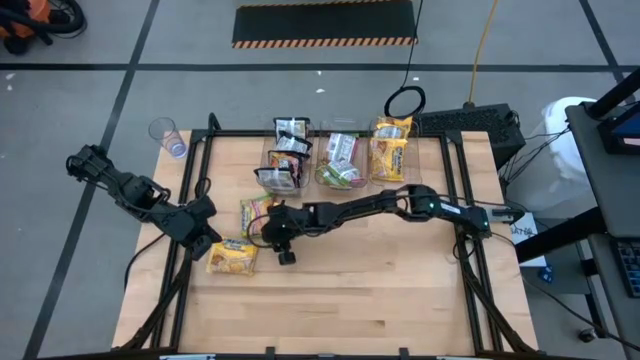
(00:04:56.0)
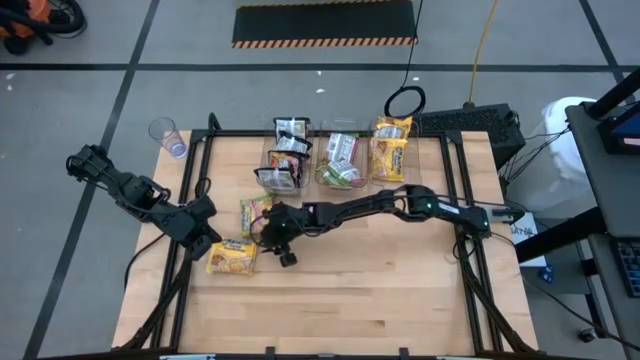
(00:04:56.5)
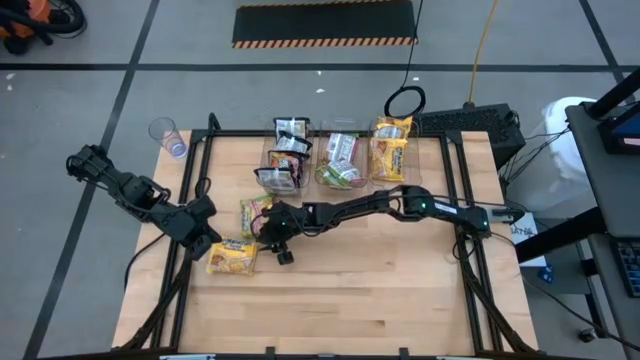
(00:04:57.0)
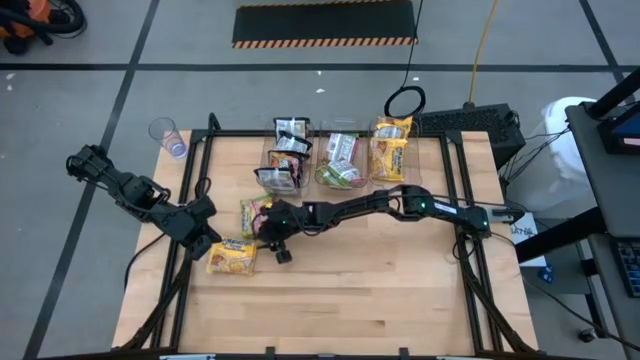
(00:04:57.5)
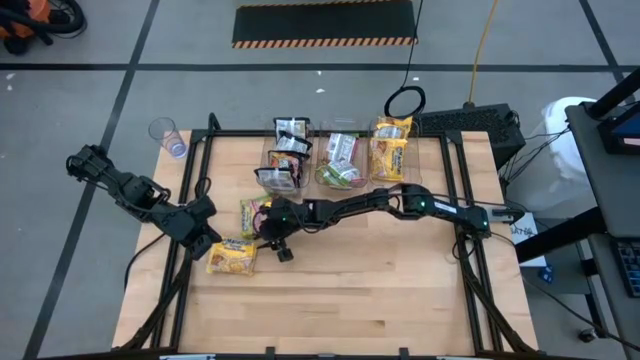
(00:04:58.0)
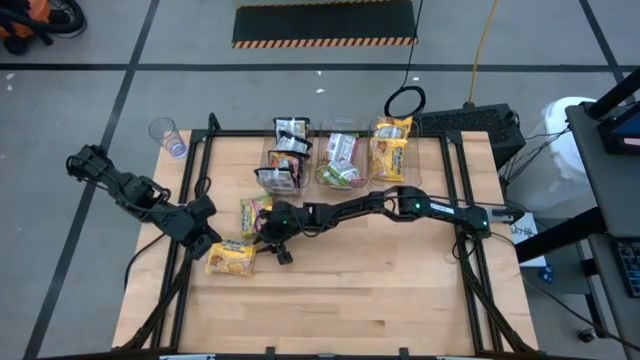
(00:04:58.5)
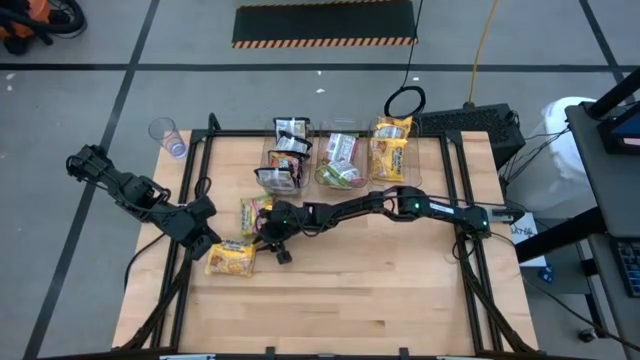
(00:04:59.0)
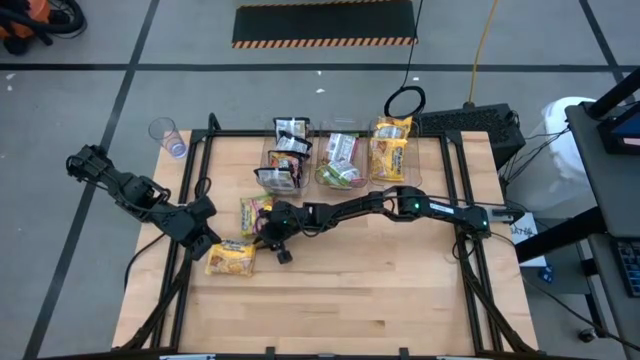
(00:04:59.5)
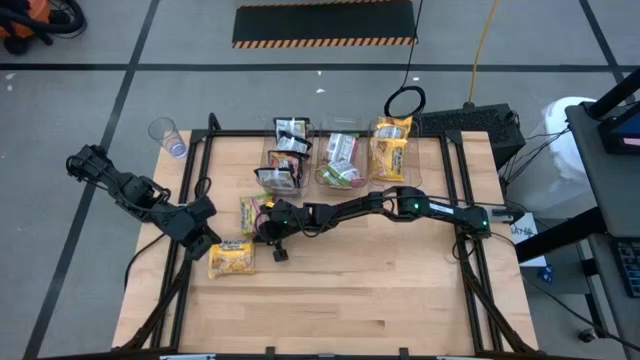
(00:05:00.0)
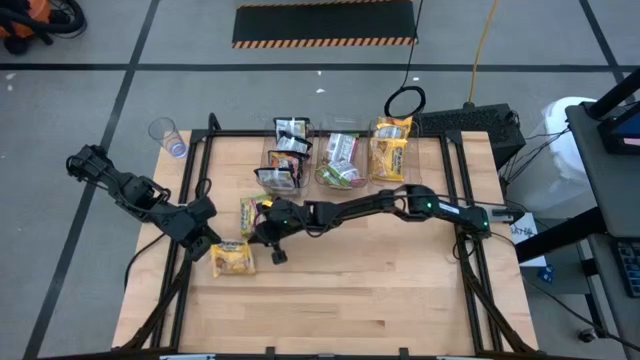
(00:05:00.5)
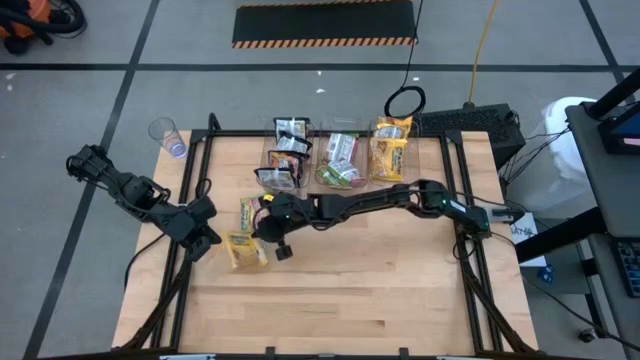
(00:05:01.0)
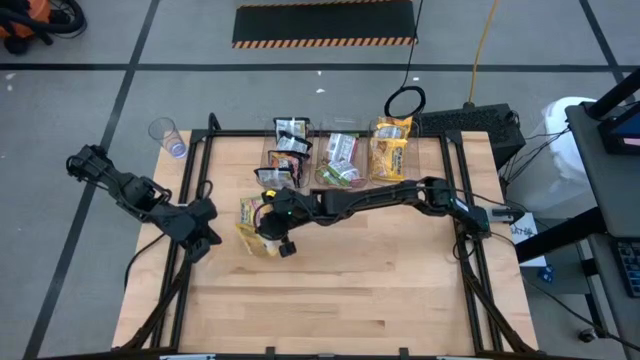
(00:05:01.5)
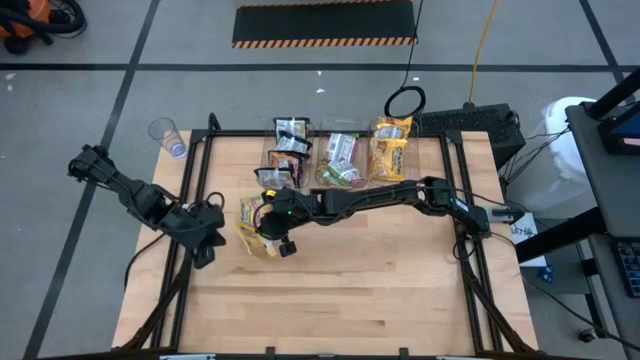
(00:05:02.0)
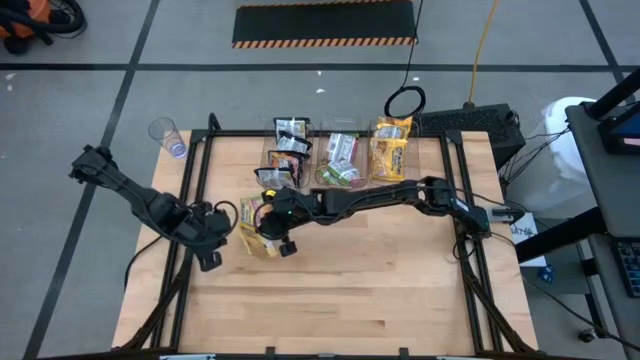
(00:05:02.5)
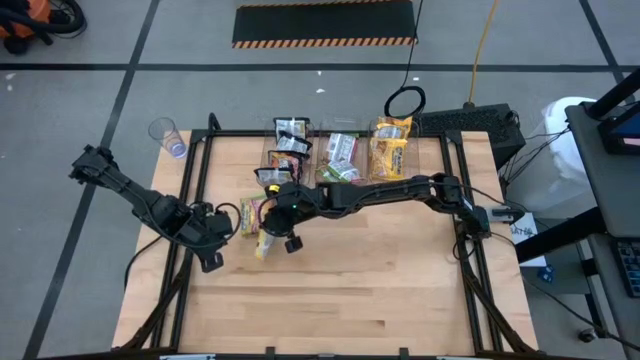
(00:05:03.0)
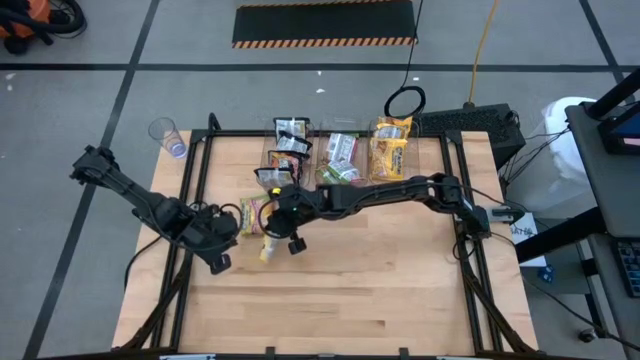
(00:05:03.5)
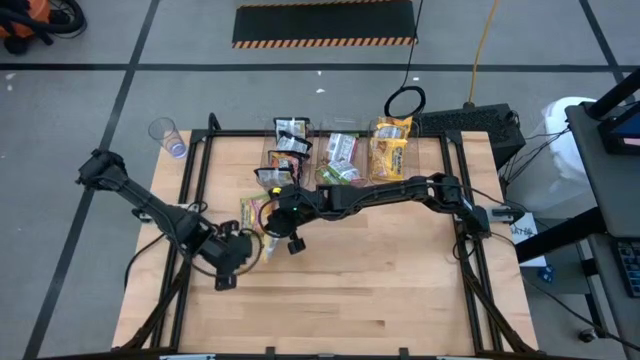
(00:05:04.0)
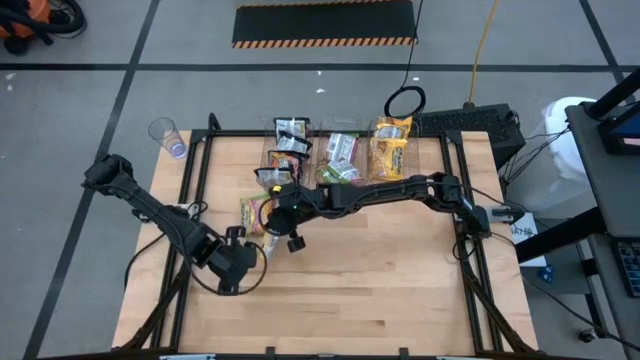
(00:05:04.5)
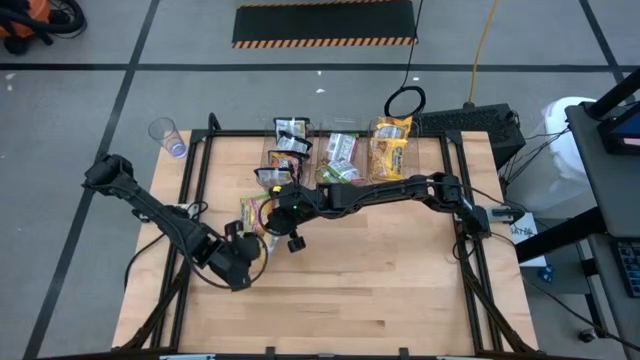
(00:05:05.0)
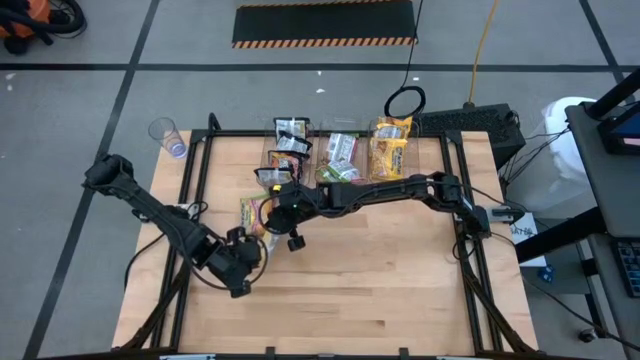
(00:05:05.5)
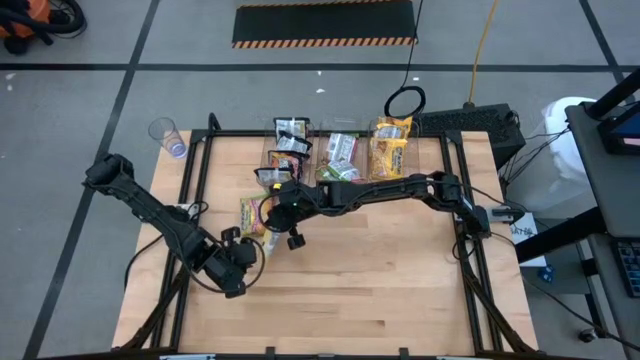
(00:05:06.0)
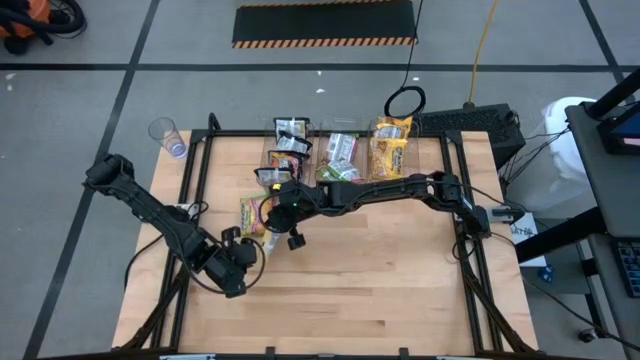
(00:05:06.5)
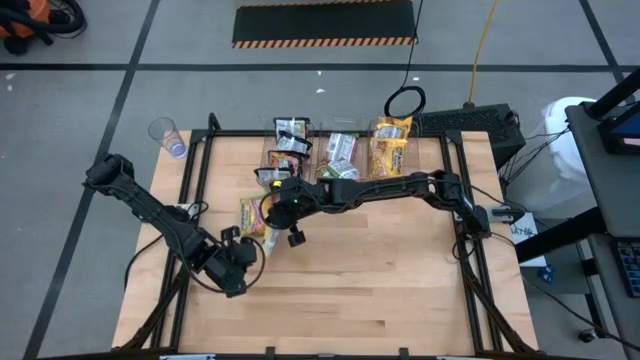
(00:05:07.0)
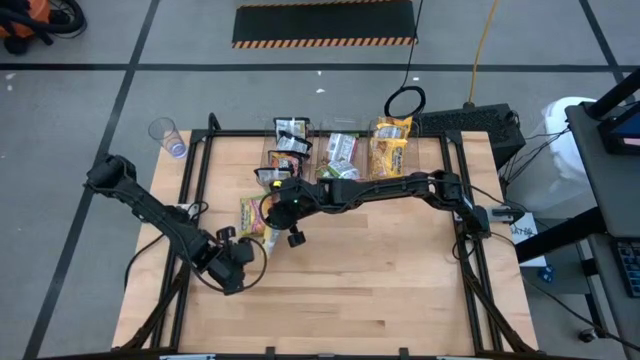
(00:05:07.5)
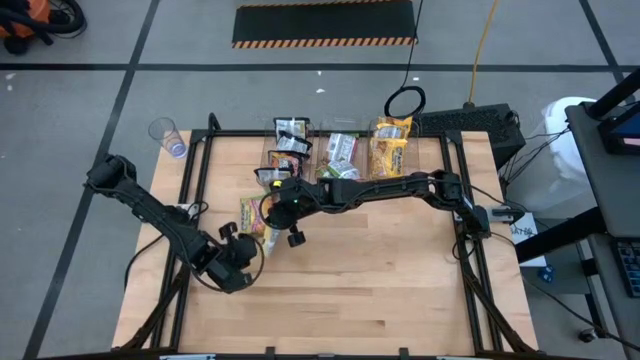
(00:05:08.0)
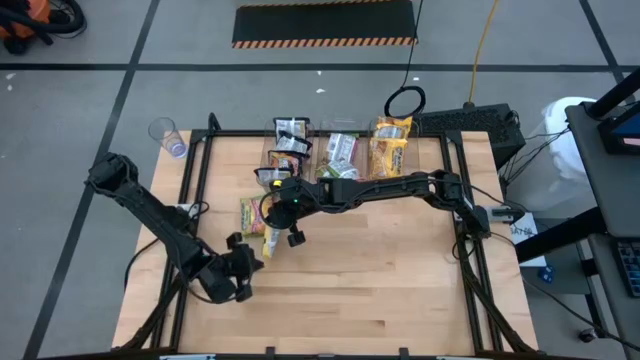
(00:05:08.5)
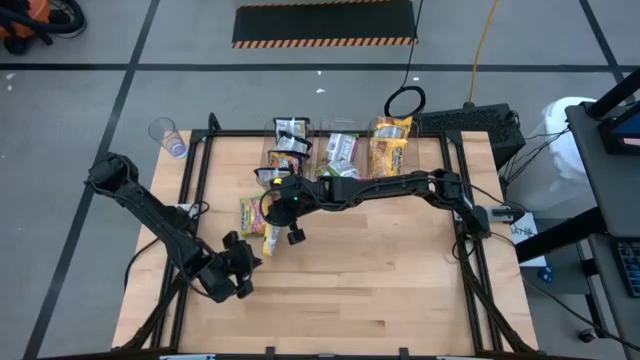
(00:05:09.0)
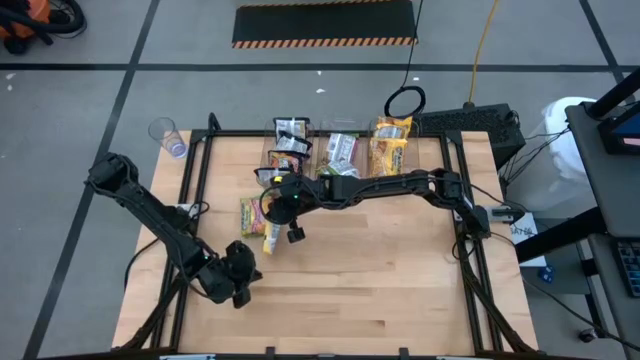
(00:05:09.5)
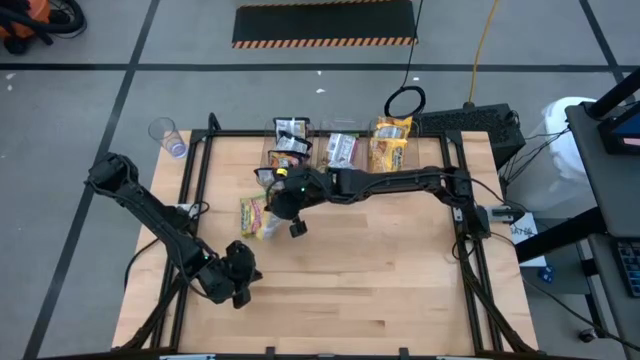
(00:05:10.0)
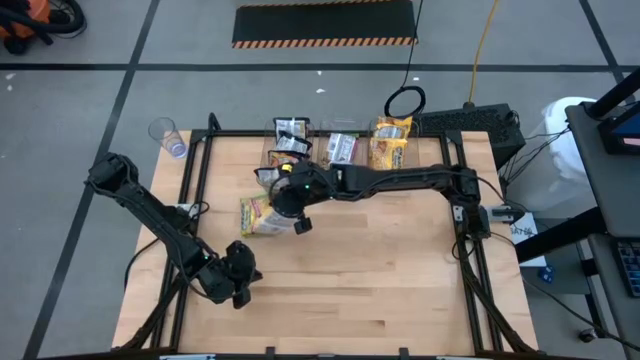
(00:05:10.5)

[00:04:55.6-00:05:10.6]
Task: Sort Maruchan noodles
Put the yellow noodle pack into the right transparent bin

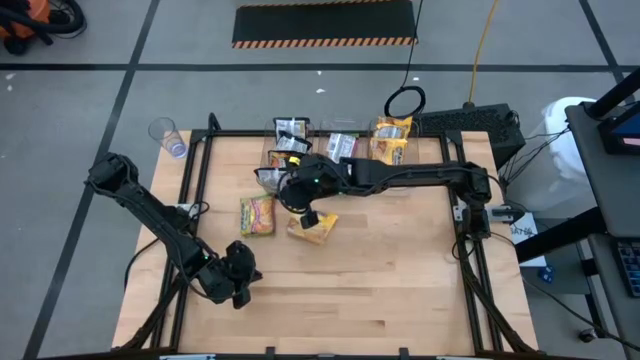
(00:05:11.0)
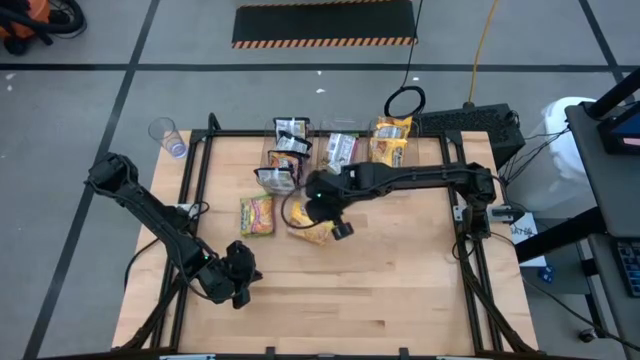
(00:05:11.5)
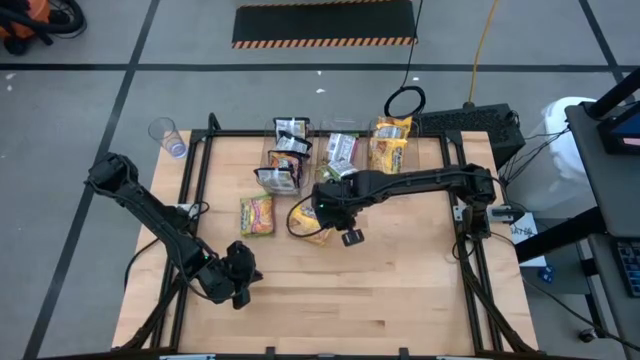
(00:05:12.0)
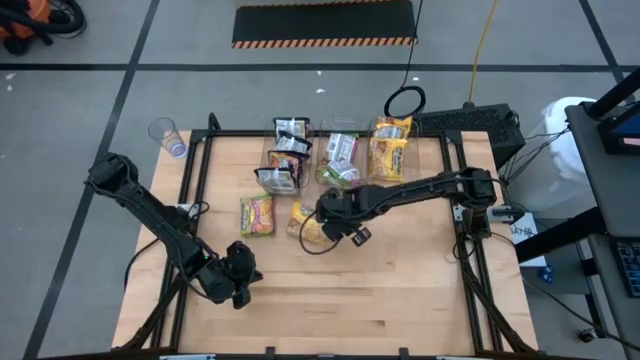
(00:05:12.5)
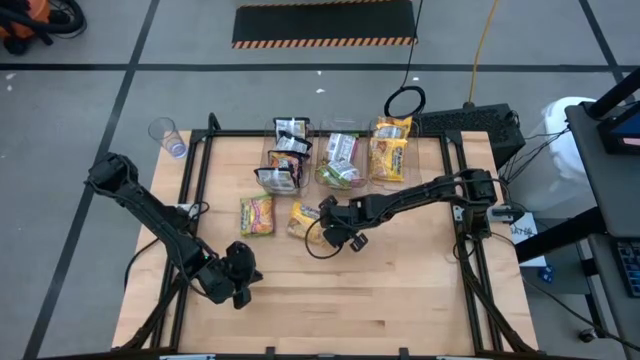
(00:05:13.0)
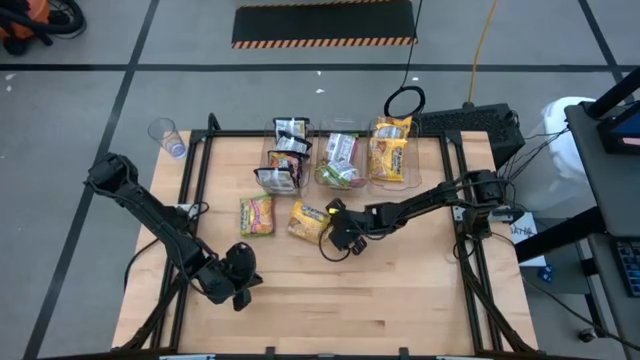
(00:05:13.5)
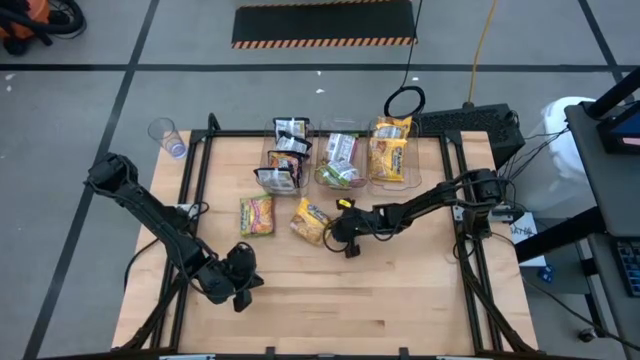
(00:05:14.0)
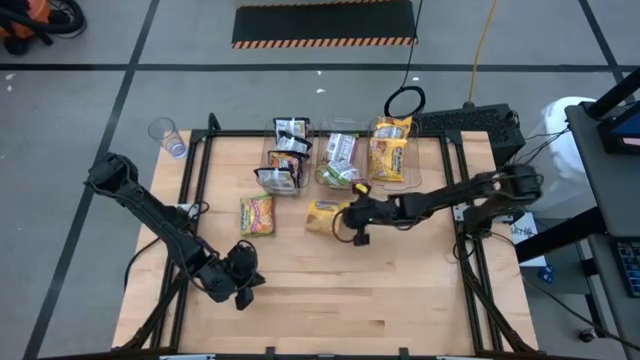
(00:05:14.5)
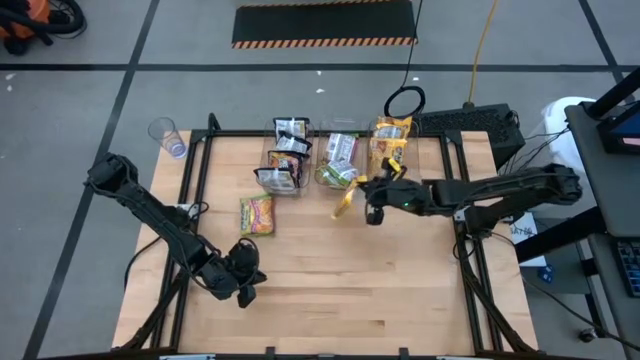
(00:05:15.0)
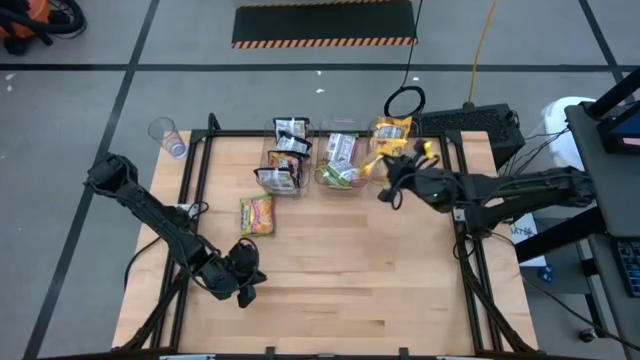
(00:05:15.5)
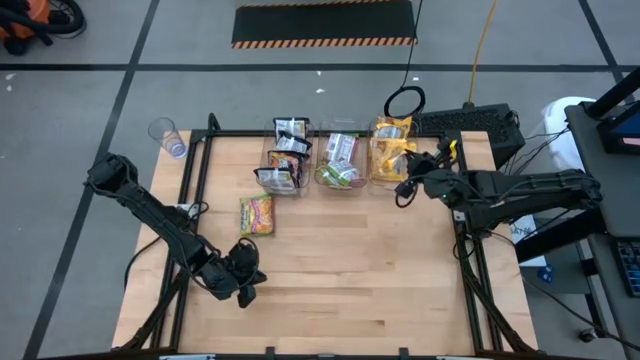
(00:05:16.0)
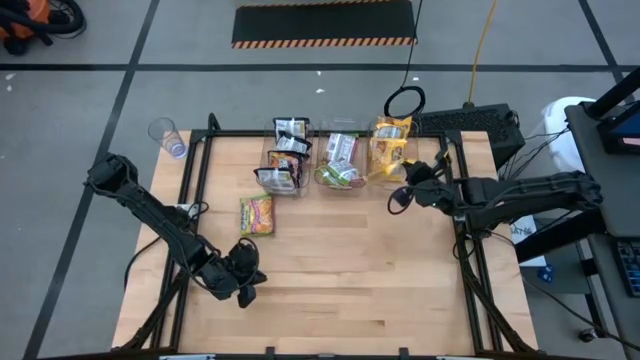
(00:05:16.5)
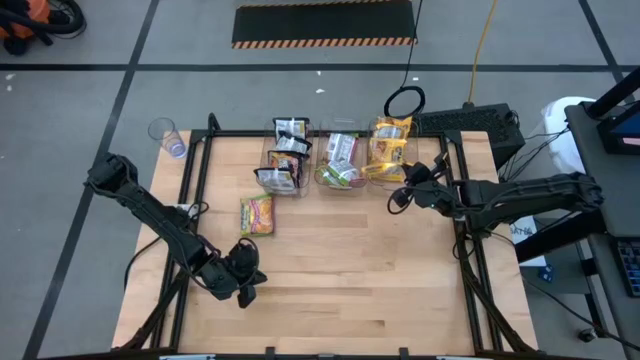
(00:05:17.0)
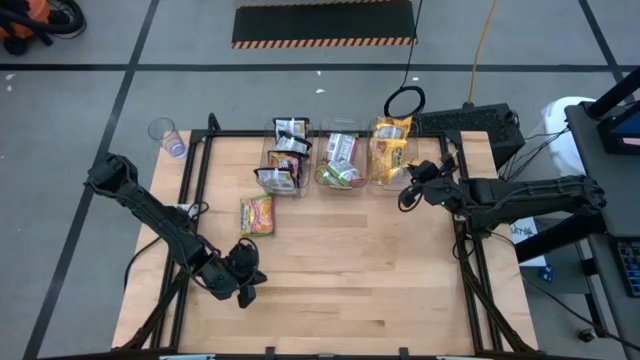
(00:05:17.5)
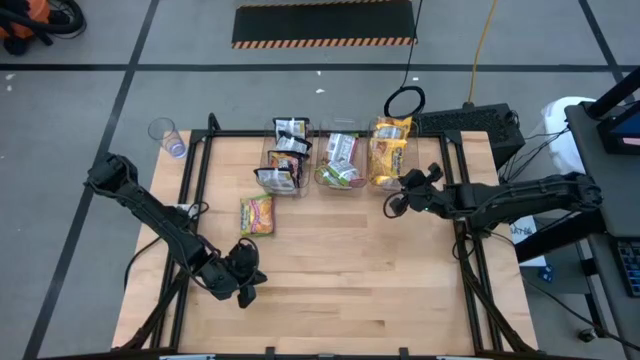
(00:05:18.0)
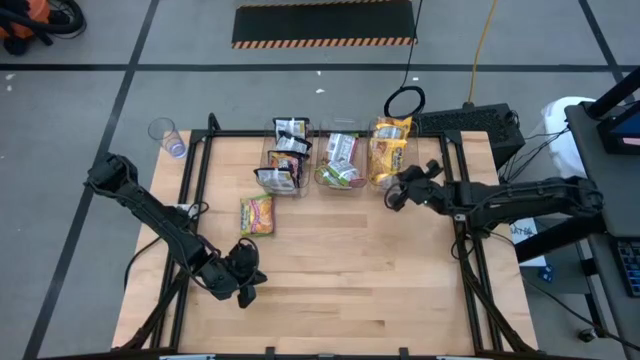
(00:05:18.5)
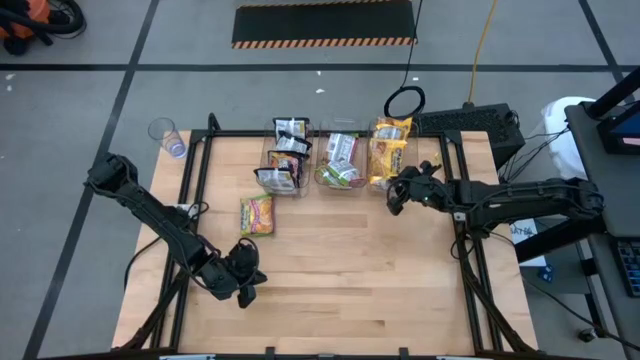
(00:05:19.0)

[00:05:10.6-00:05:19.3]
Put the yellow noodle pack into the right transparent bin
